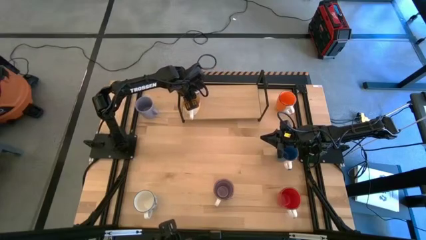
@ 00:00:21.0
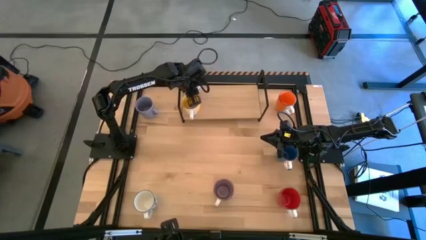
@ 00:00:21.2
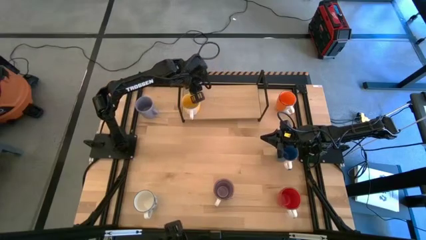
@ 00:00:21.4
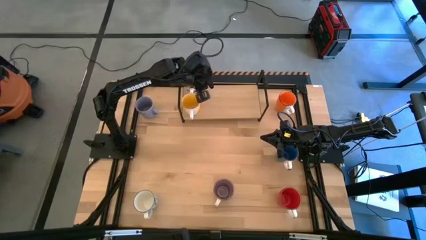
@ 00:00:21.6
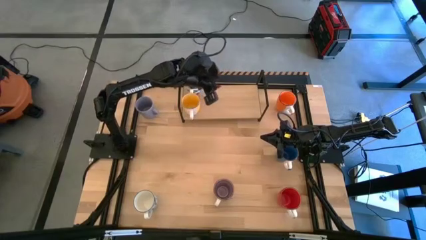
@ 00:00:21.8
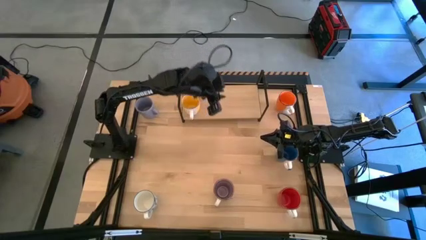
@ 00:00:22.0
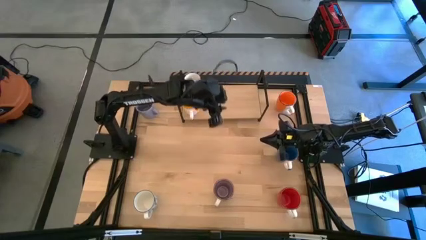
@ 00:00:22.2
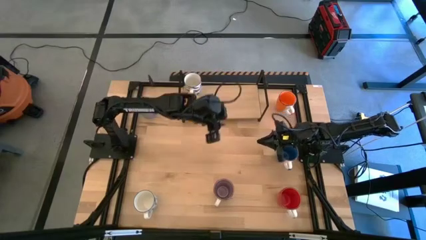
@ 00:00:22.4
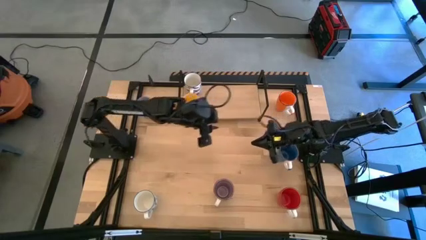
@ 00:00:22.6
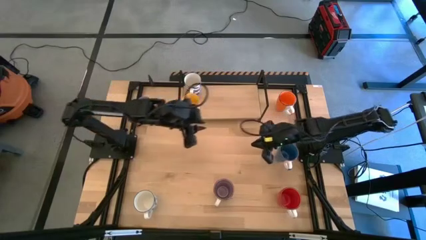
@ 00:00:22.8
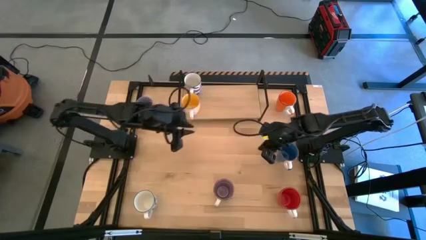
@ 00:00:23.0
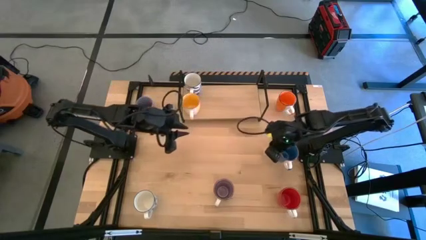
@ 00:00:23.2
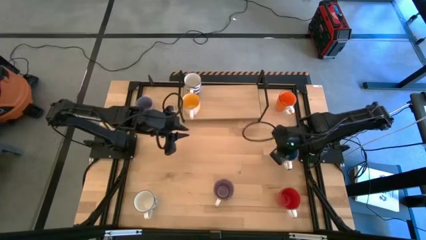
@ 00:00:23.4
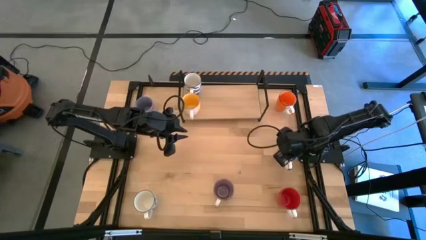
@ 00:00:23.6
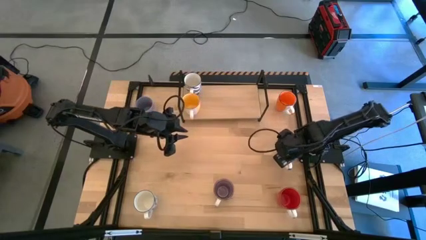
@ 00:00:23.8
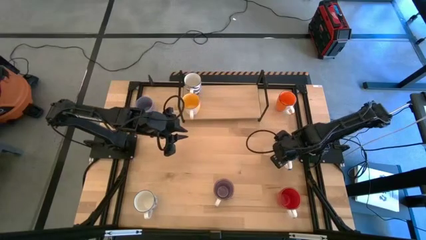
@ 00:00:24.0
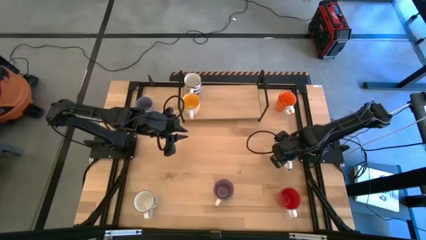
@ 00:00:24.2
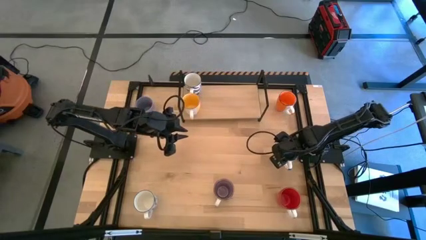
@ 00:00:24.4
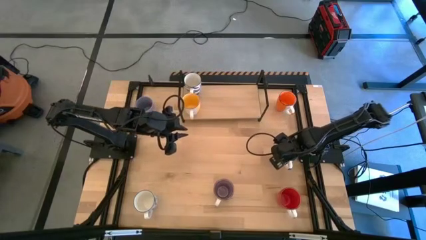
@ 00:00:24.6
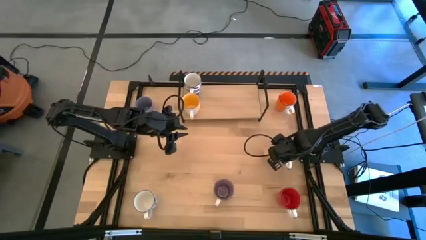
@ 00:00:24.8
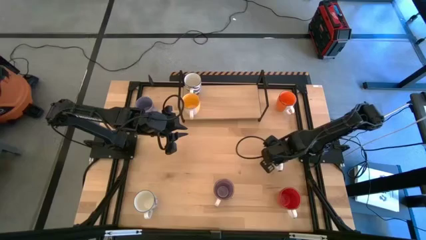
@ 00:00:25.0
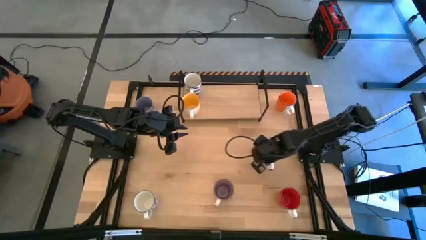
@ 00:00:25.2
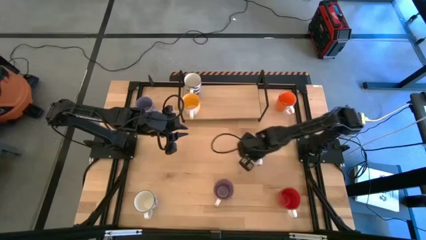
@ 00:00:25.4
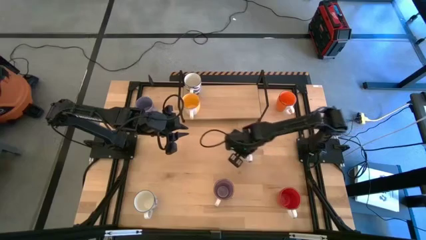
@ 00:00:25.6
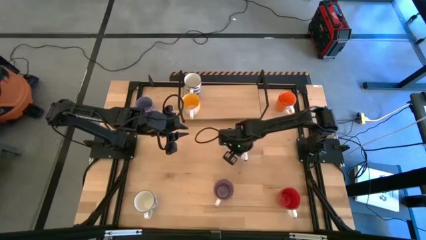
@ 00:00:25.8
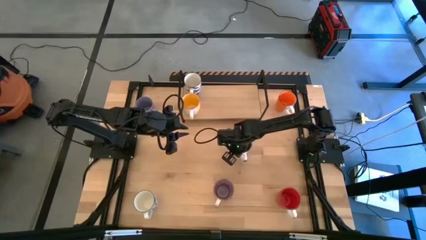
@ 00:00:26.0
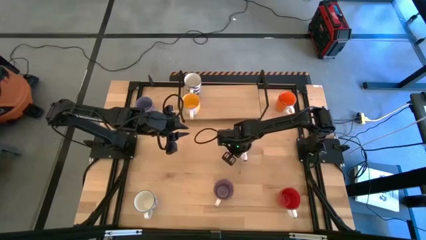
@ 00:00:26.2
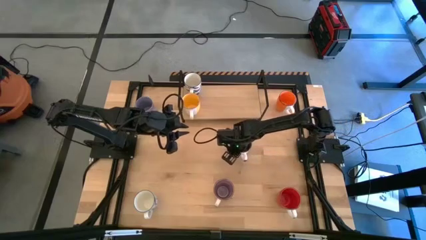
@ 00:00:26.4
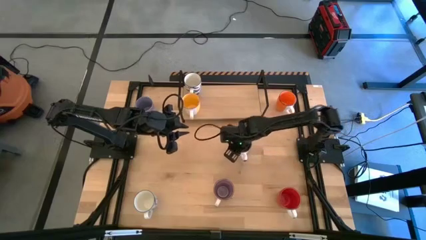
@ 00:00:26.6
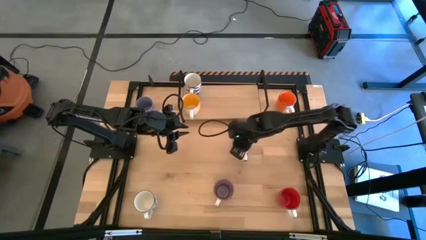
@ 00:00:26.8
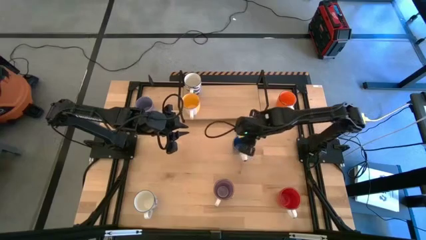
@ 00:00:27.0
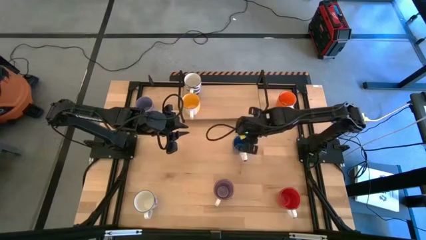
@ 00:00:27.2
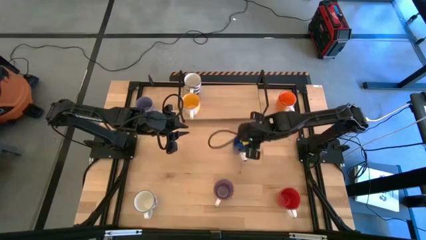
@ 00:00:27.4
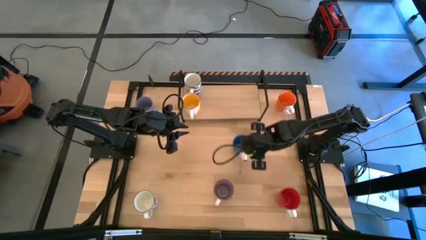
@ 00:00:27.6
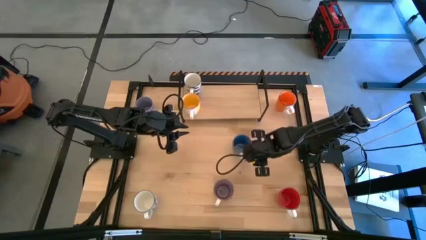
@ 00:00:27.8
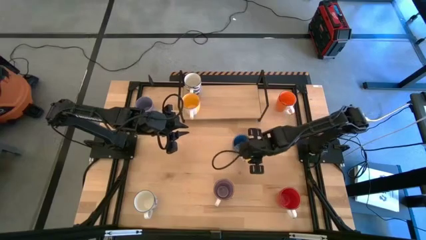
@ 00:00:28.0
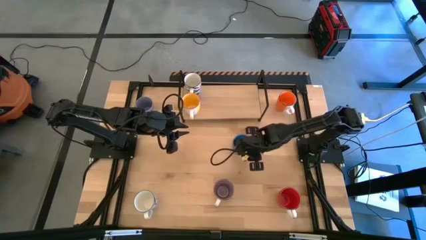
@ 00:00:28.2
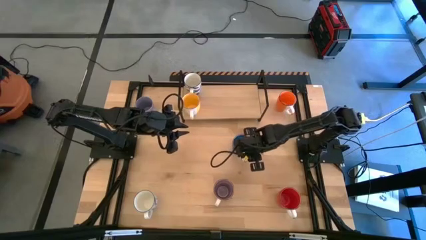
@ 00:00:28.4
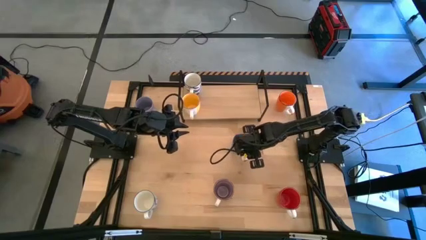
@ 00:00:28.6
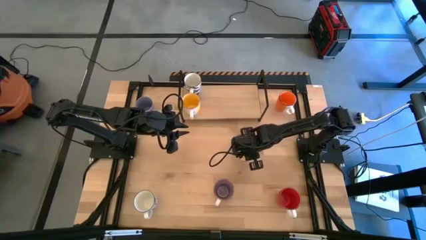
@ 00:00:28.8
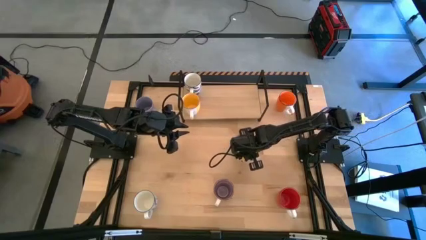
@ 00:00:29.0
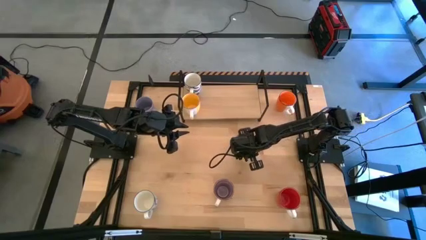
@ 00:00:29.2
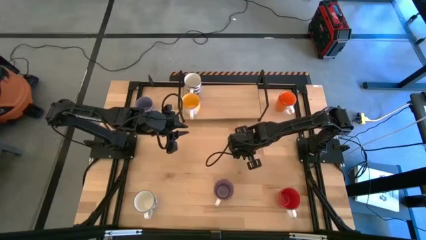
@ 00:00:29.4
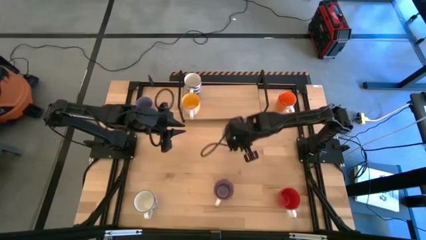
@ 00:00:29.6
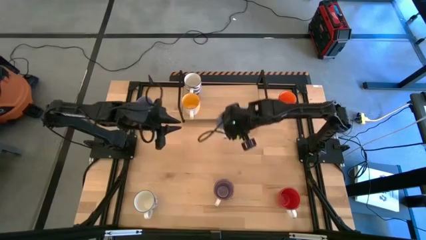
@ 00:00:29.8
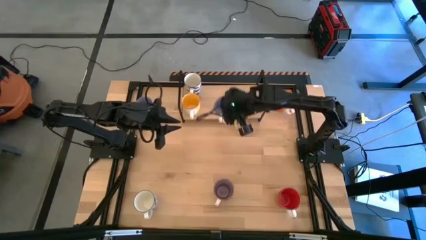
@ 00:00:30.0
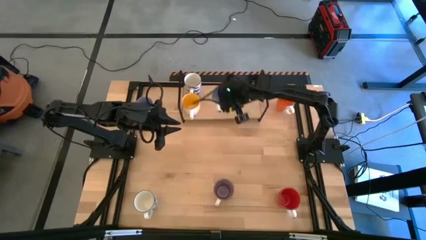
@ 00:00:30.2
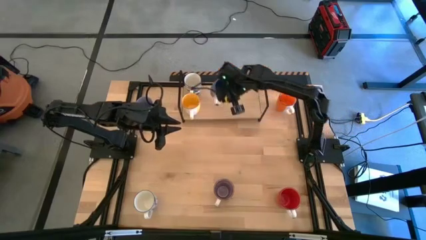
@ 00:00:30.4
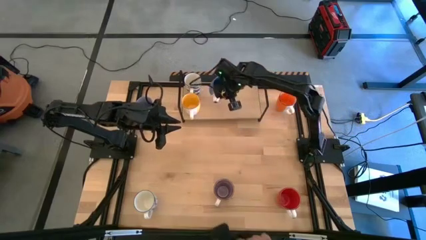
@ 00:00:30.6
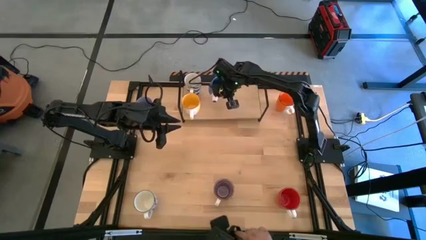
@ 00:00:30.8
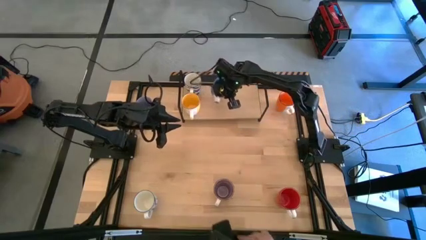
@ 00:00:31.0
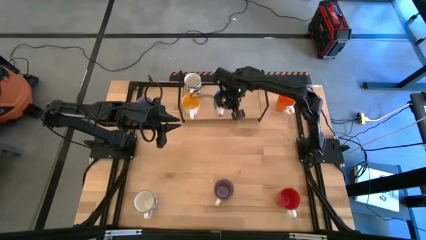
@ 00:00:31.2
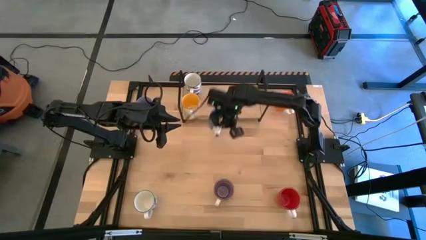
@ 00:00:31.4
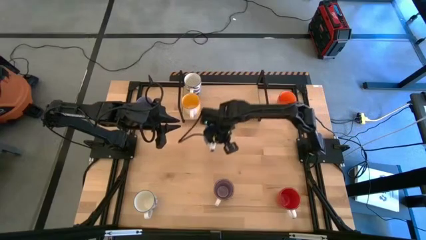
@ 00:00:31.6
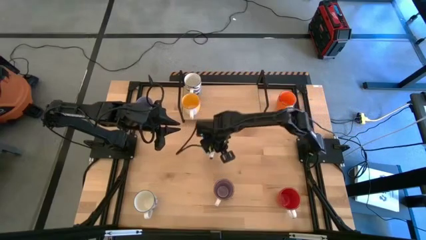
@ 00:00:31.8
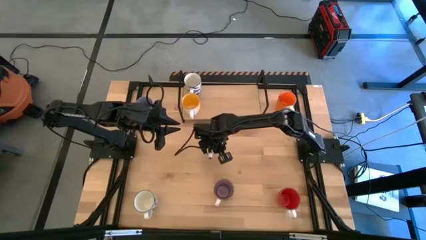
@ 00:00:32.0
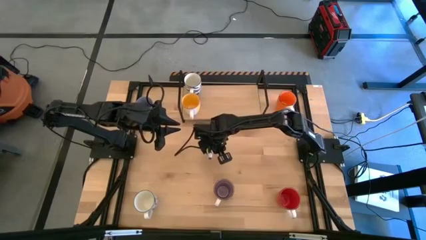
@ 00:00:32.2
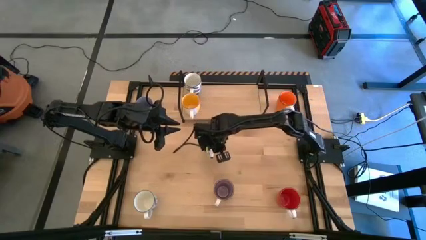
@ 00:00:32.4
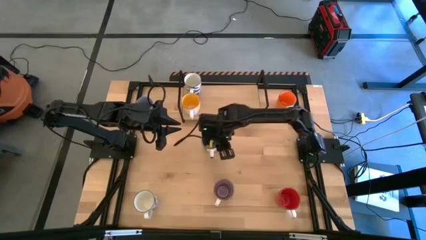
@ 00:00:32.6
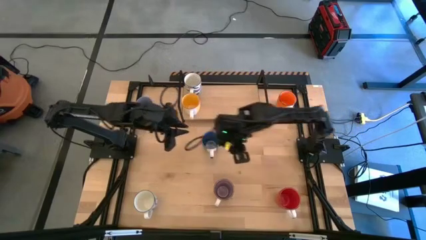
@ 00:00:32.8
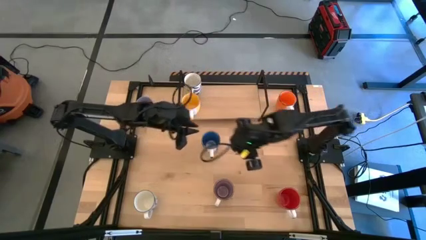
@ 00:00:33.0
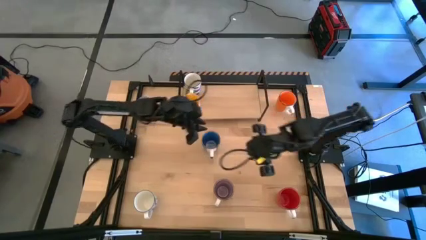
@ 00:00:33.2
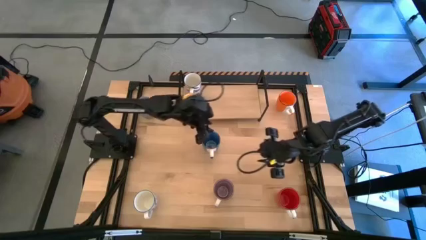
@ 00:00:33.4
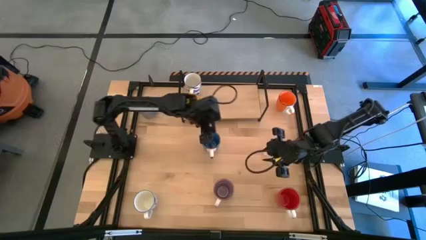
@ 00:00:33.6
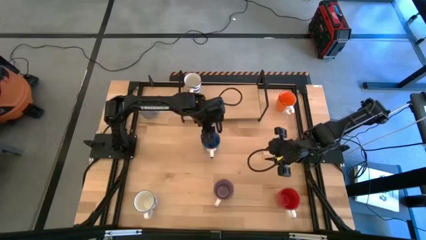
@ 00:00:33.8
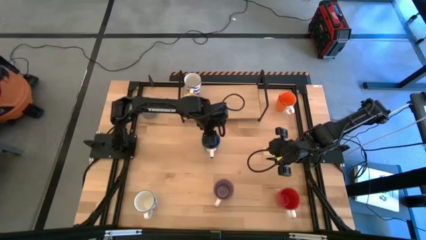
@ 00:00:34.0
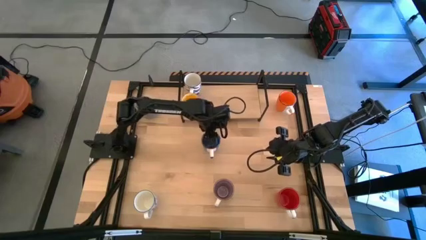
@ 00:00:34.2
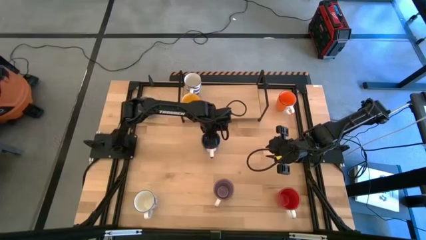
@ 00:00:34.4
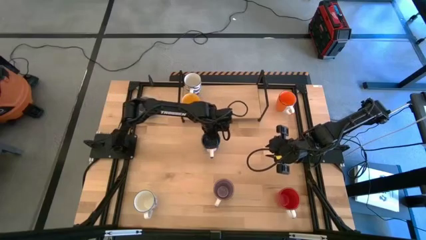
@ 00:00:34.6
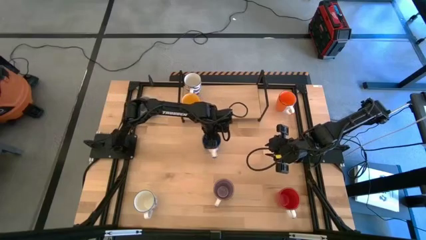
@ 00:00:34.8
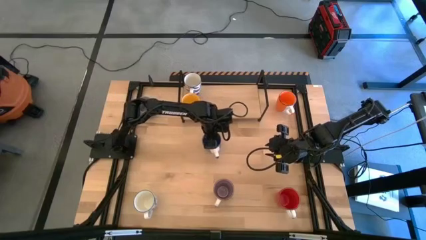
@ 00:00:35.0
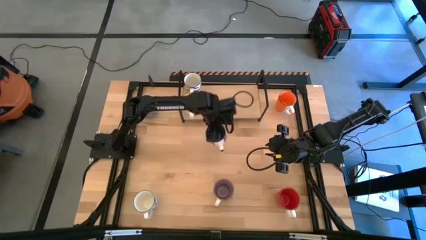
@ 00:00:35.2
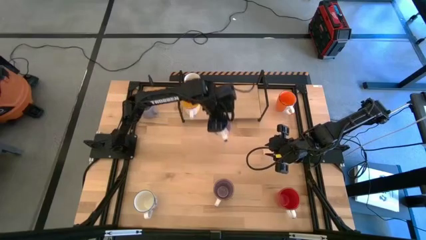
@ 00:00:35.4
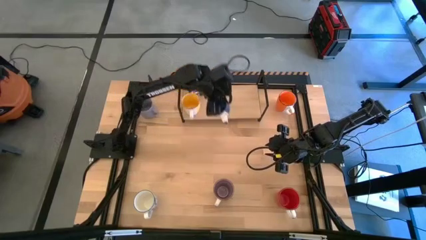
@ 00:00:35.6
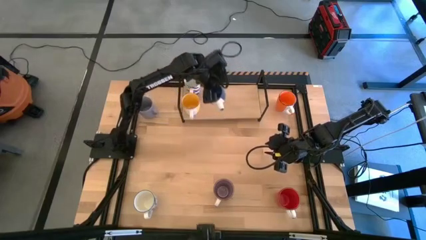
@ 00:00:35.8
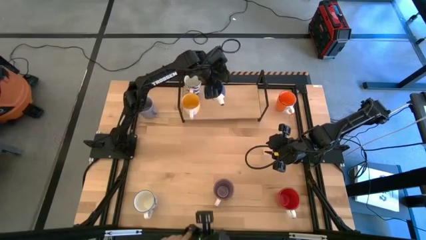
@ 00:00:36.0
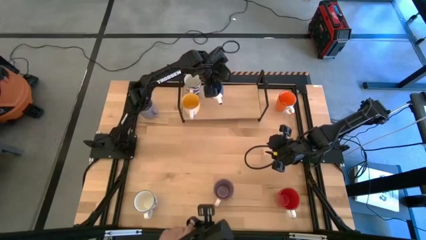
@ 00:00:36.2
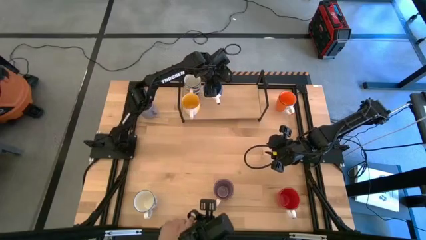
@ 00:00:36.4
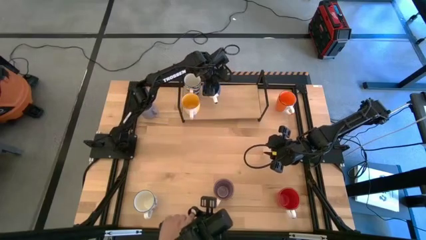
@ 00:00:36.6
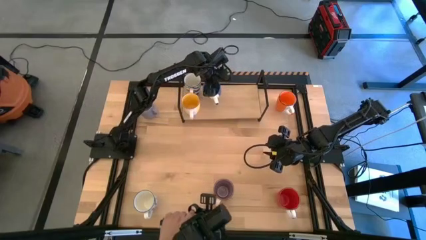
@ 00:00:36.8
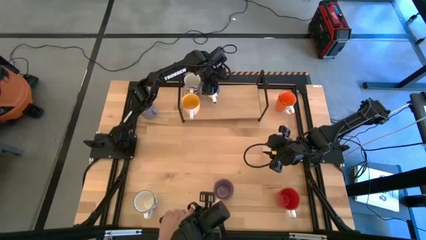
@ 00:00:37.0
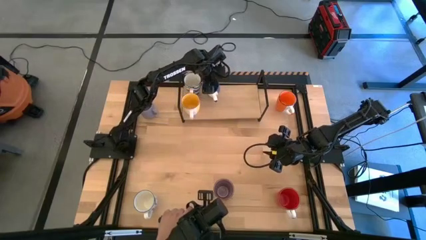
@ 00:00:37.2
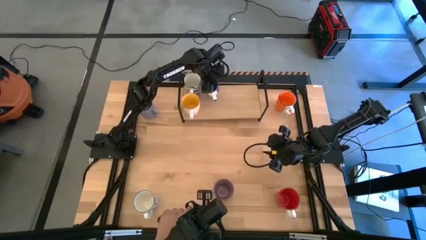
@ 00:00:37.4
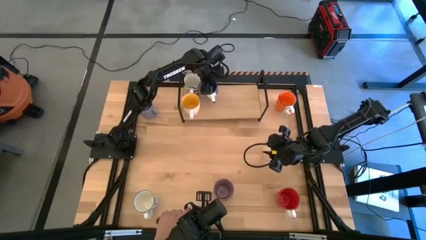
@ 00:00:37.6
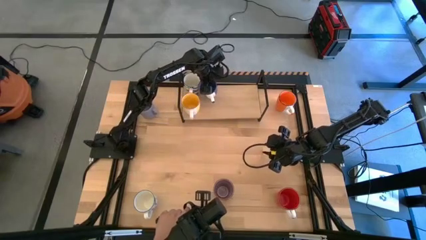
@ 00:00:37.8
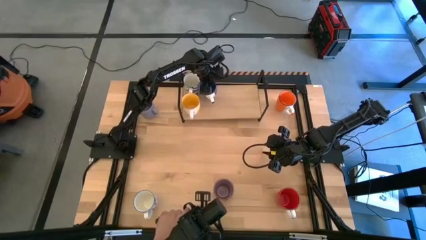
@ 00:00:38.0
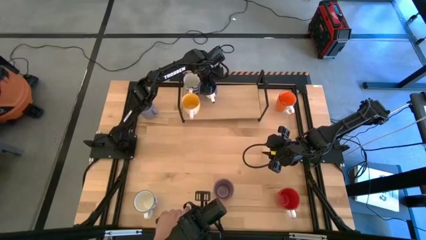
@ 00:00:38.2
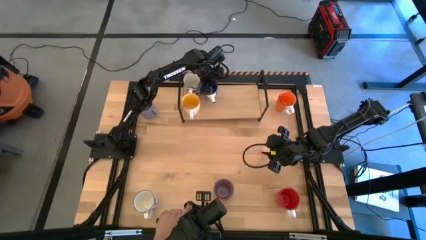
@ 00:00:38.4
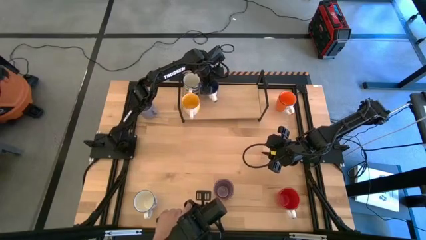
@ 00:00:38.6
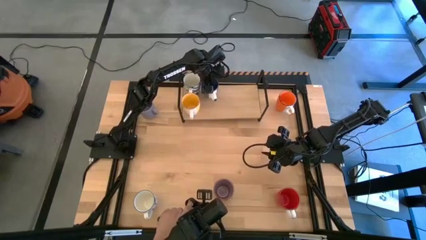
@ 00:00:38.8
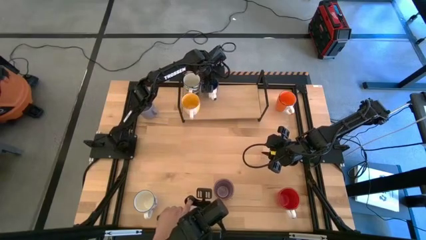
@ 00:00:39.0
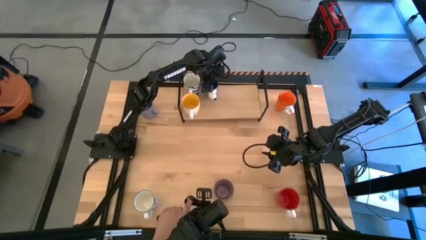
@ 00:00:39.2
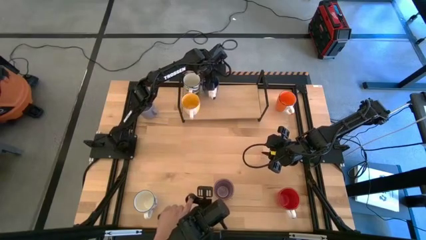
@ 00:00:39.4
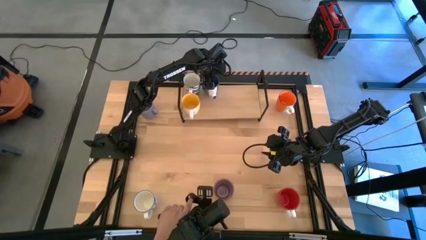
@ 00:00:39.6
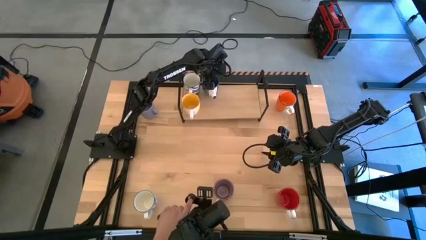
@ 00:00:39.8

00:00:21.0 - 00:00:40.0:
Task: Place coffee mugs
Put the blue mug on the shelf
